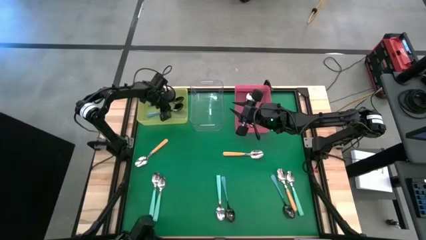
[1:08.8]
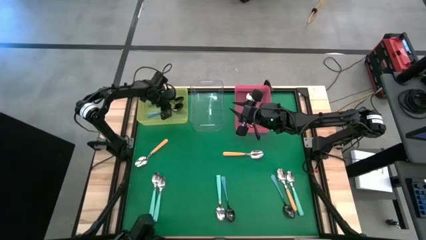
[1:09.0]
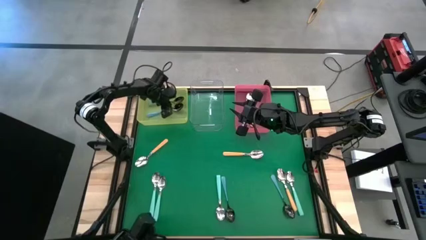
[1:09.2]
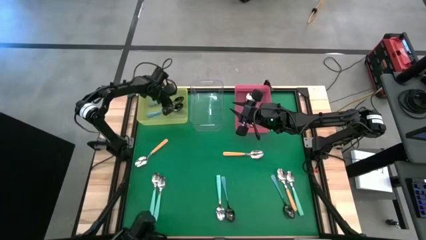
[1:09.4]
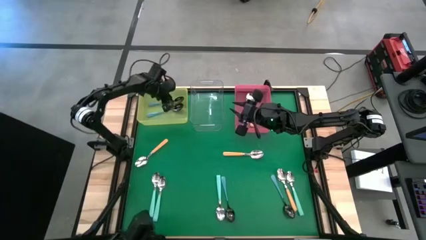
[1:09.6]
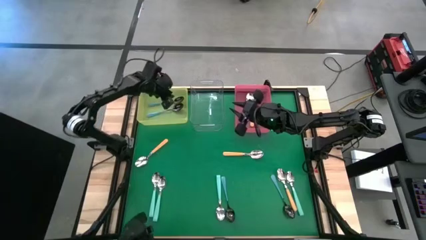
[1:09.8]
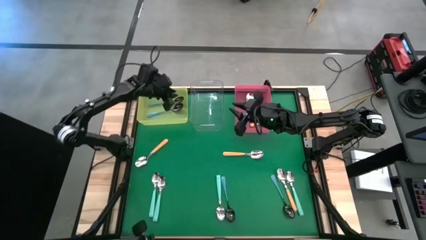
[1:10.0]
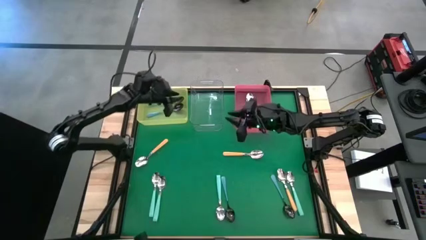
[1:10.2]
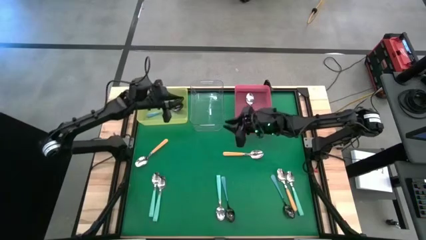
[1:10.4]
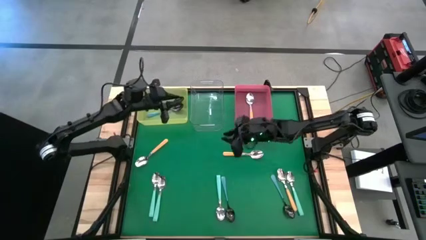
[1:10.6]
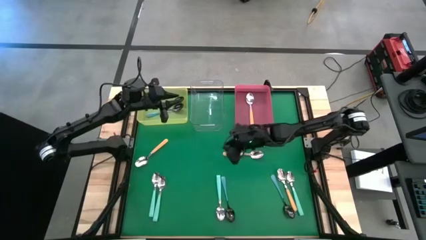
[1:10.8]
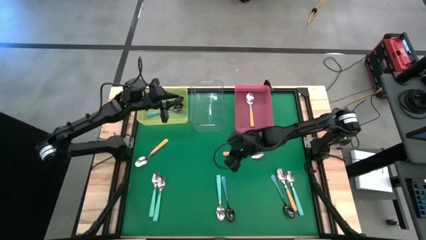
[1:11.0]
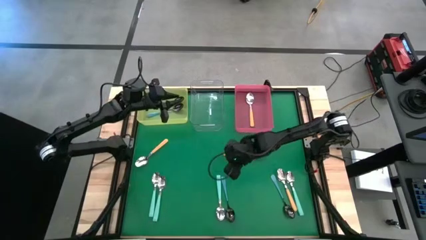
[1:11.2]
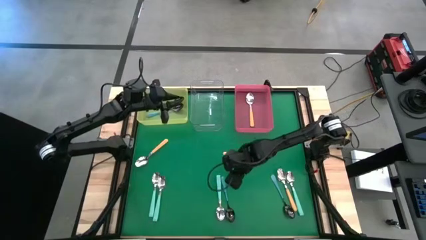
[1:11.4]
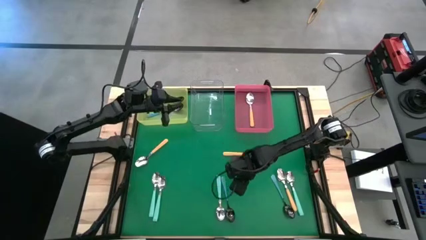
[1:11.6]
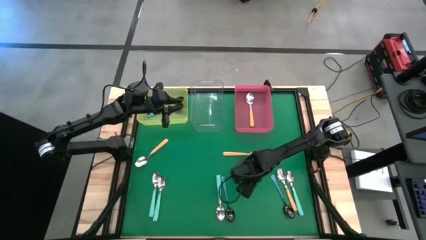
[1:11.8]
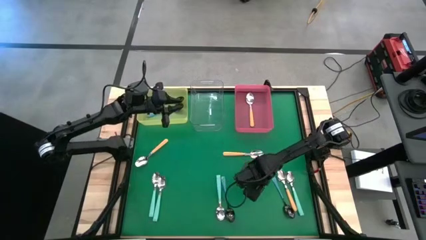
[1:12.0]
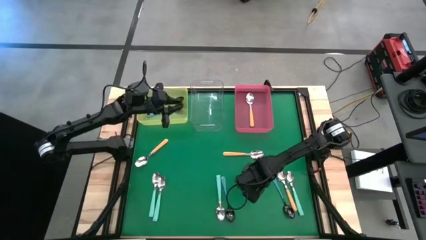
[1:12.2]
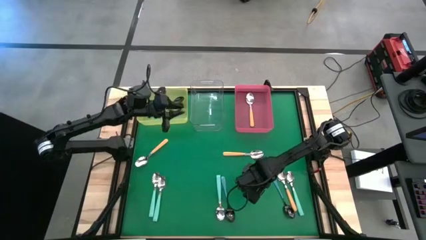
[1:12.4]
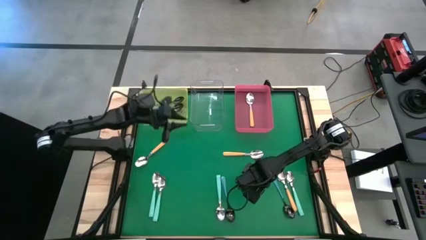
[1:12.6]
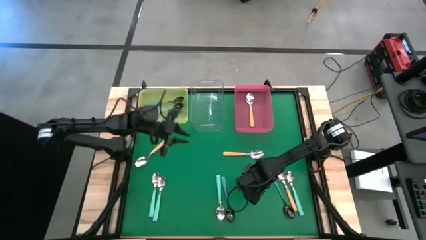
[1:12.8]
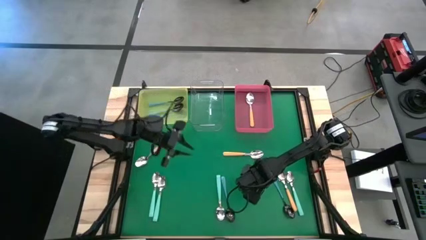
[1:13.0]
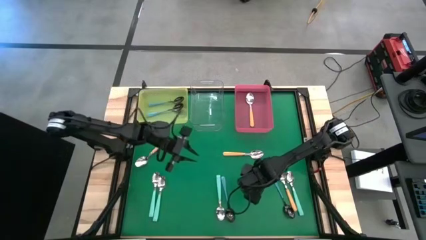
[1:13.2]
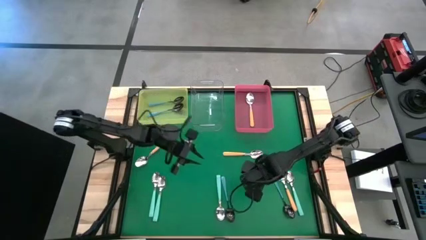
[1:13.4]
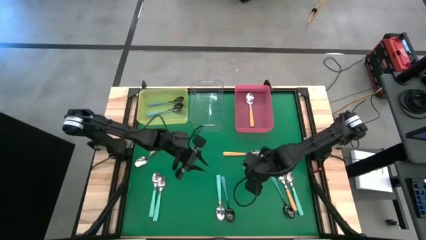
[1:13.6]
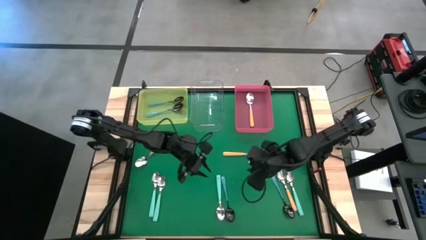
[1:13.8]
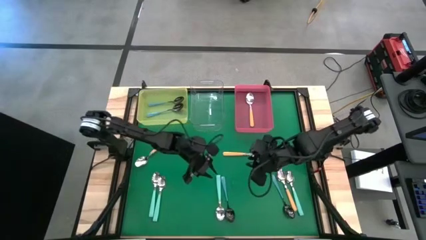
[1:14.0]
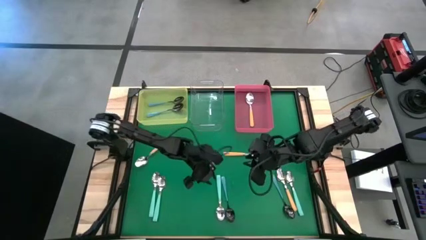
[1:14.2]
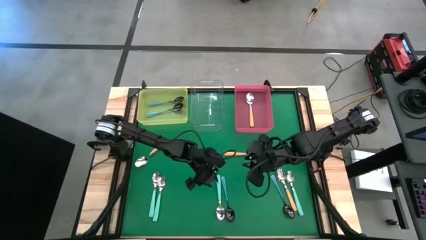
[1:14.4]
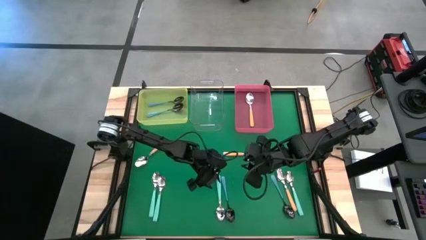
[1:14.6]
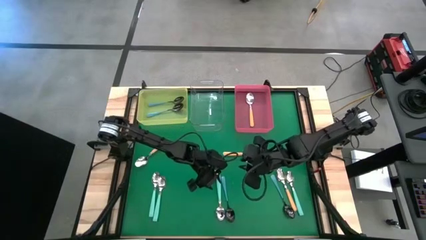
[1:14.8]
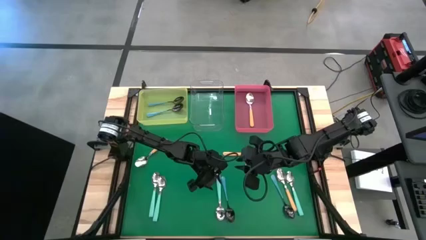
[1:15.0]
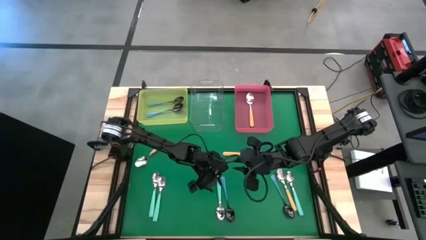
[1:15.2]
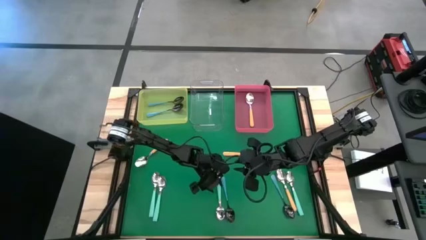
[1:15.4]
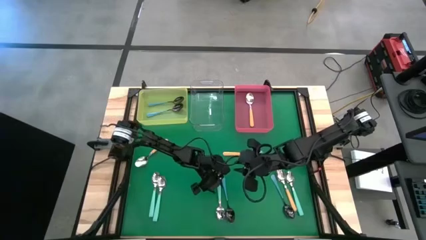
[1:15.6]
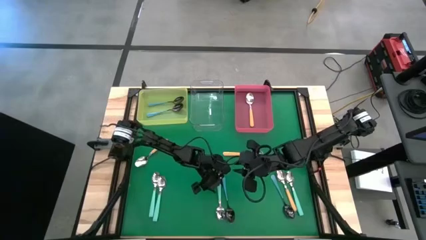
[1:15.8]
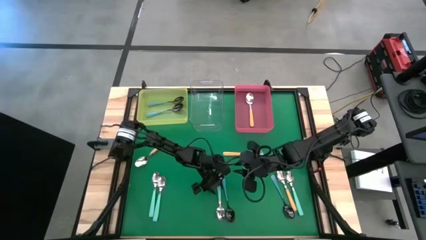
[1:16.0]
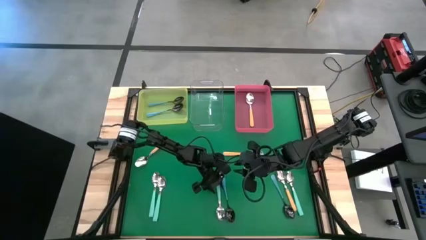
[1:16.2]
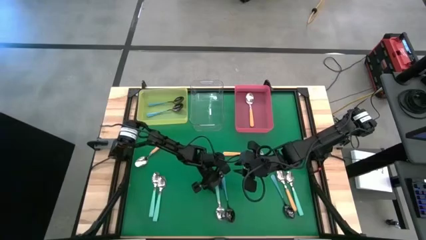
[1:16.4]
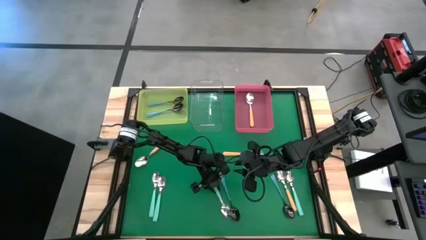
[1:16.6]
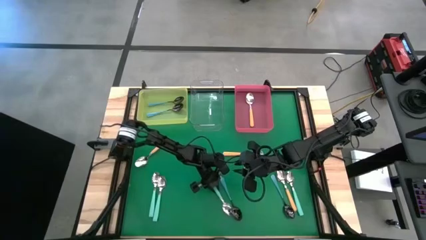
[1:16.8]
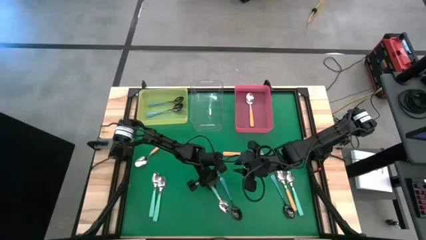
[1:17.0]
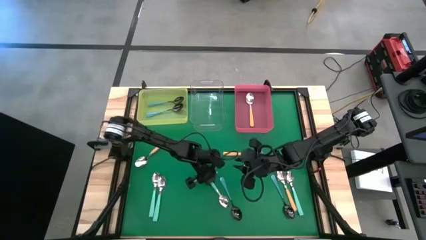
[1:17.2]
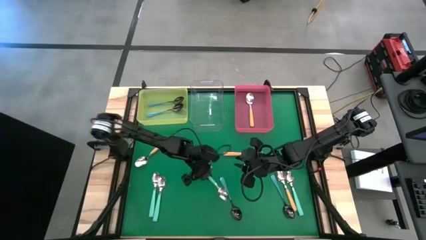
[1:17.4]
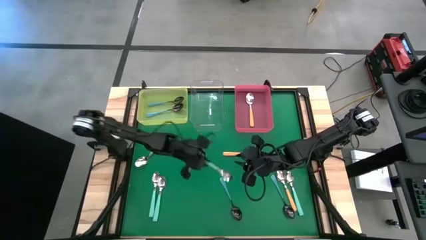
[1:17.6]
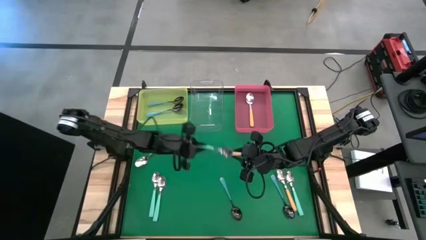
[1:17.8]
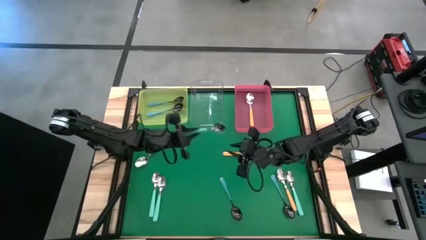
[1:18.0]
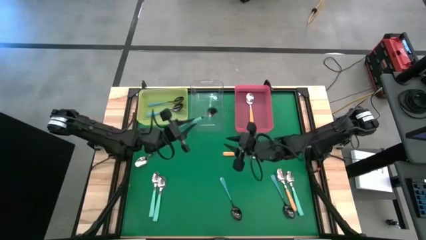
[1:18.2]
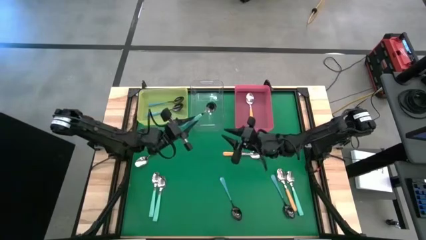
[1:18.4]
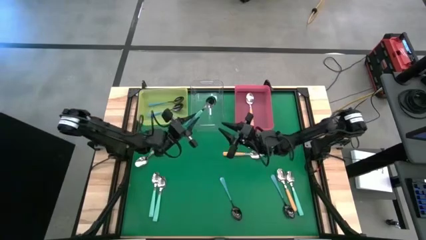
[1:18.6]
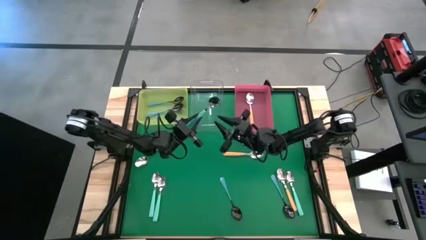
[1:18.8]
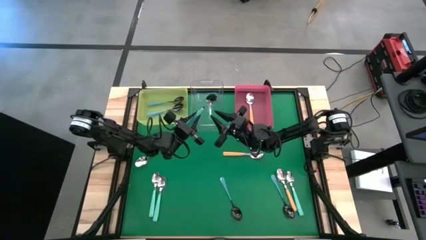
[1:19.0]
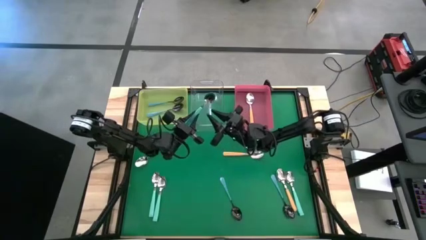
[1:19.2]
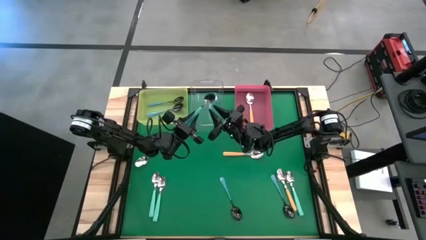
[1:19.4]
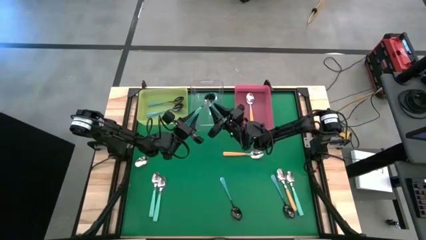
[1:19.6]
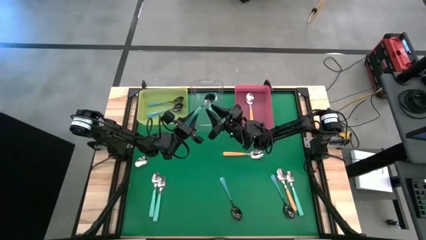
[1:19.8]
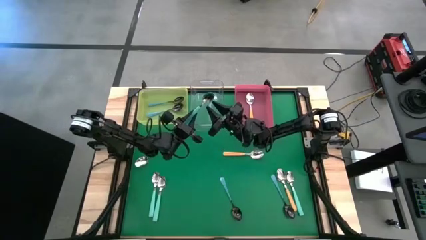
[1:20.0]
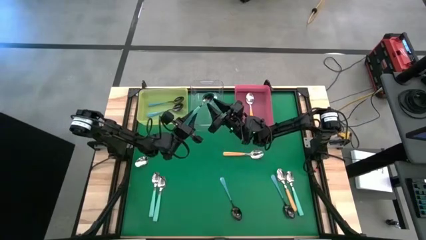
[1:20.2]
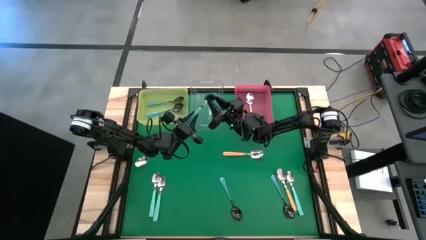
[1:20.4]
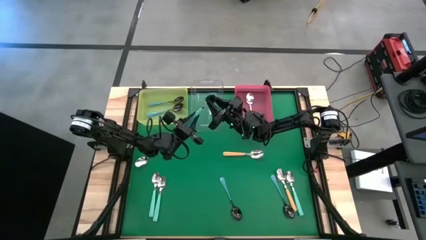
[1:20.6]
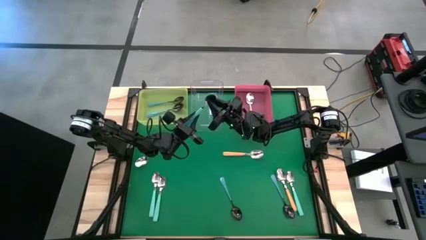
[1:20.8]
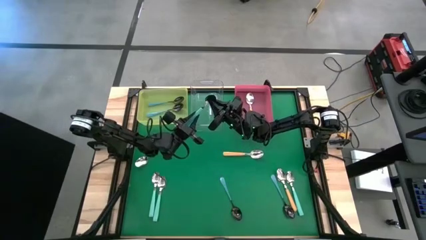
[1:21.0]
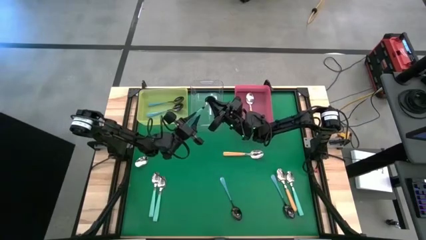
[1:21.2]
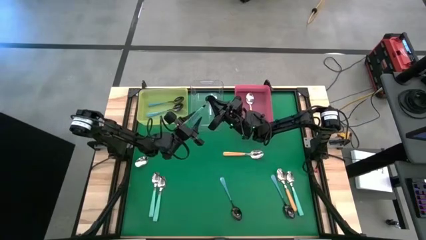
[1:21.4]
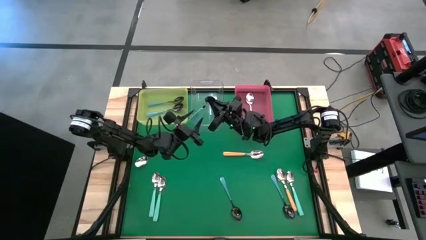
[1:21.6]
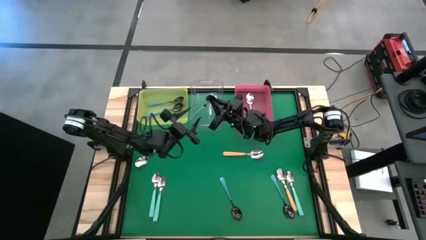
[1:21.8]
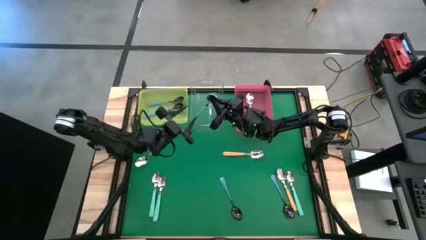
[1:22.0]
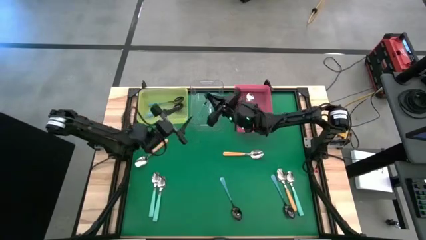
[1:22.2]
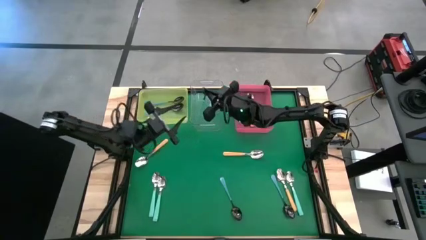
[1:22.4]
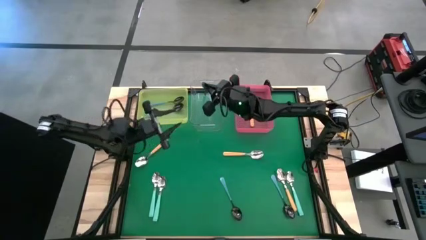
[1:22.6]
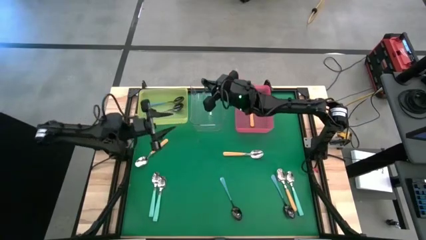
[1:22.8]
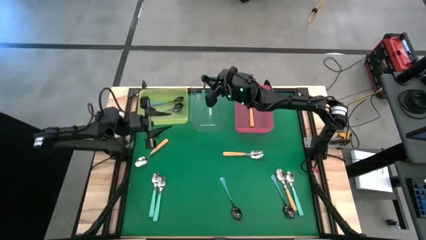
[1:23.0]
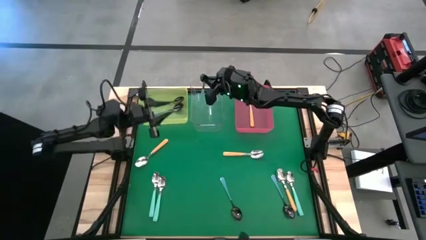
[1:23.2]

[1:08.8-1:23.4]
Task: Sort silverware by color (type)
Put the green spoon into the transparent bin
